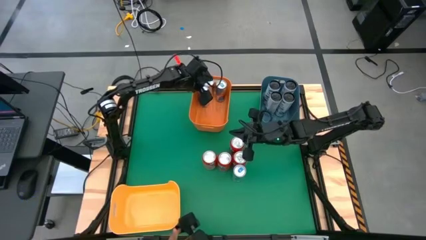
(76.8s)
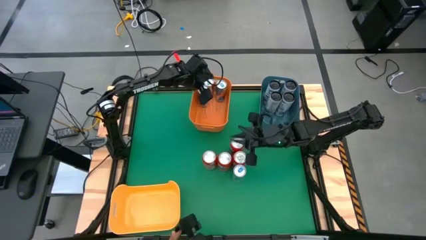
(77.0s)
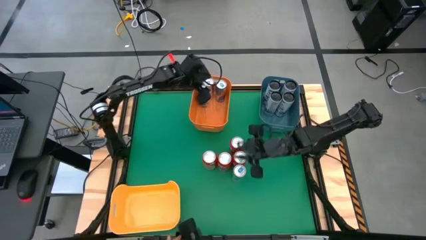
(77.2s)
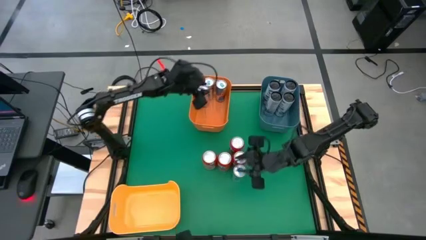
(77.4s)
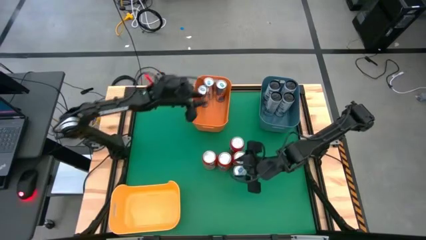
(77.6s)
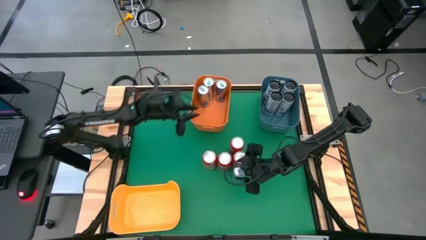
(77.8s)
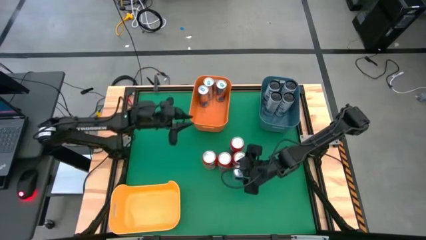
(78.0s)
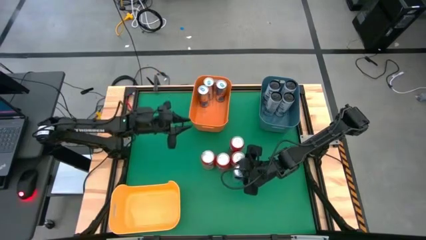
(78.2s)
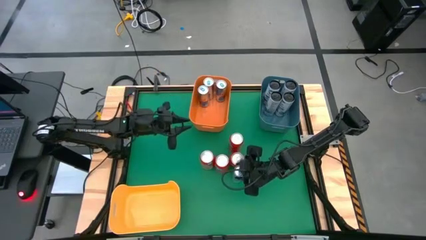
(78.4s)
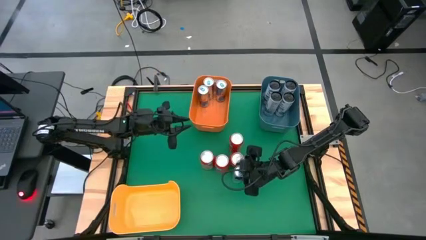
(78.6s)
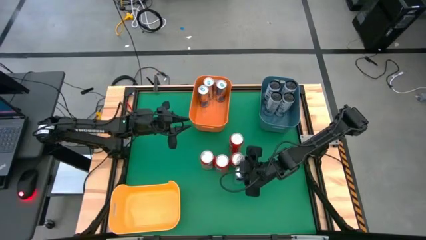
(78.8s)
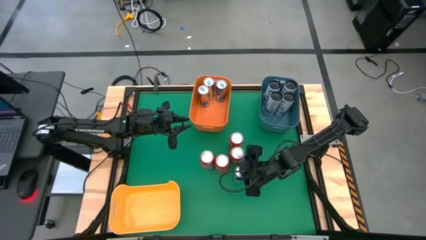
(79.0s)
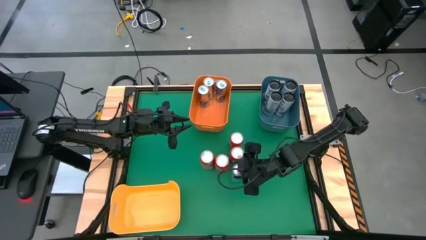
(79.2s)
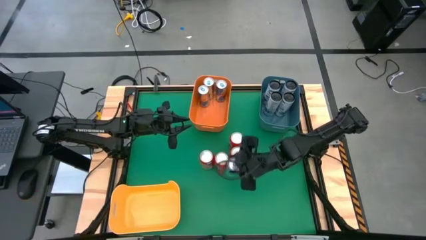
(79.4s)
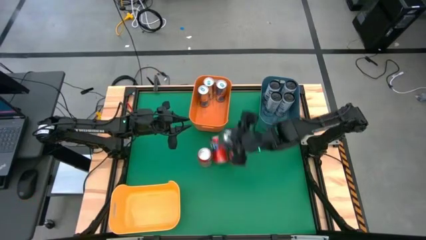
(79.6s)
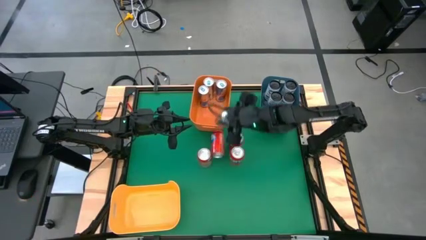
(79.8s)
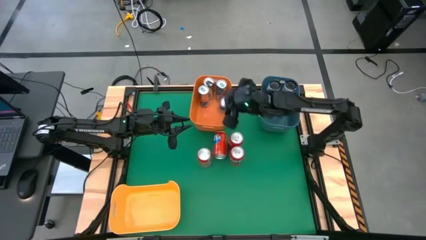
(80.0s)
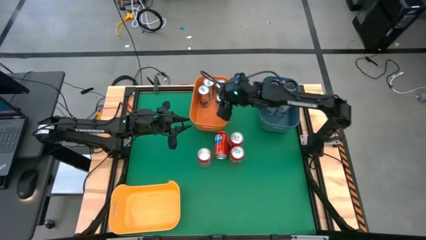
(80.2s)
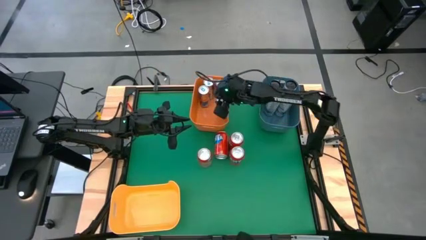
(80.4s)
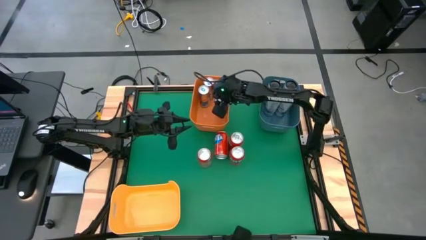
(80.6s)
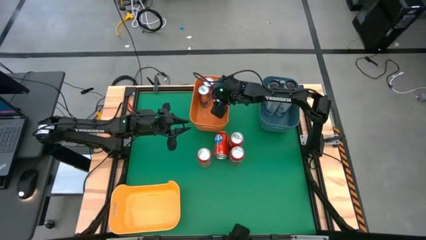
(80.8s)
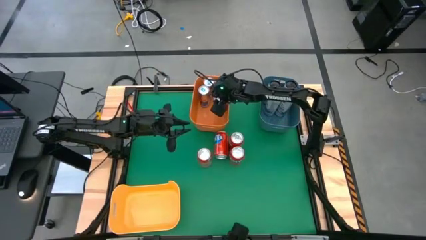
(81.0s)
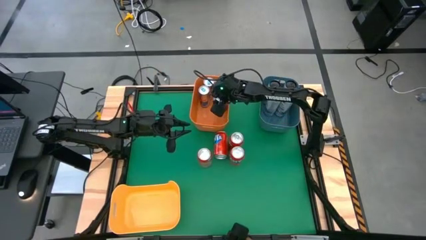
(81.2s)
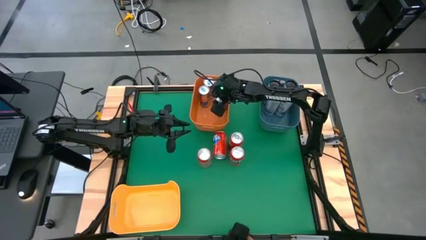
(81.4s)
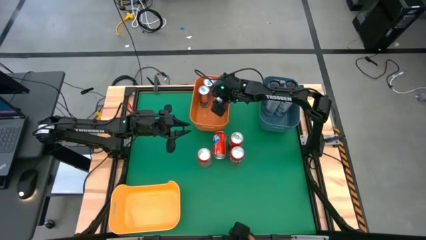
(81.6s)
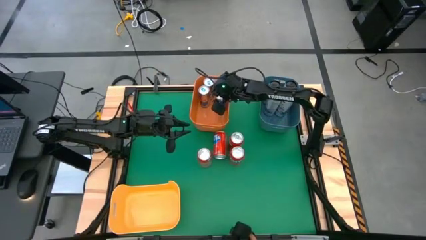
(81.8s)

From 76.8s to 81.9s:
Task: Sort soda cans
Put the blue soda can into the orange bin

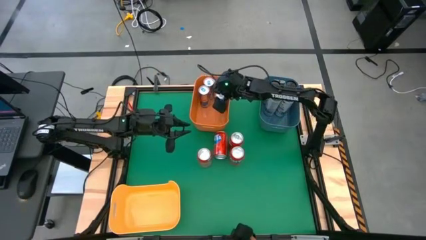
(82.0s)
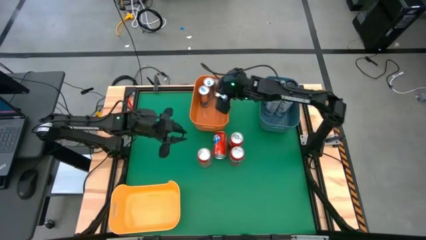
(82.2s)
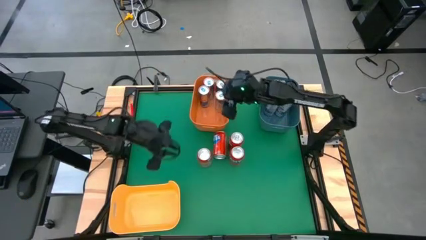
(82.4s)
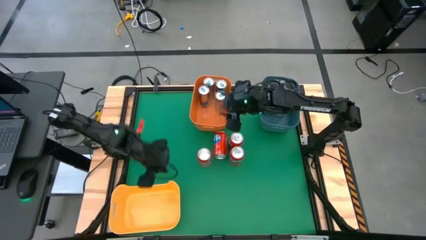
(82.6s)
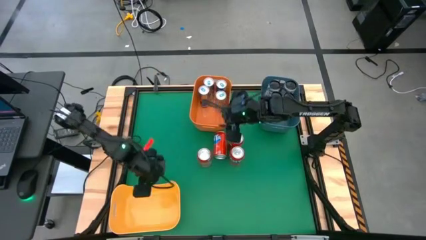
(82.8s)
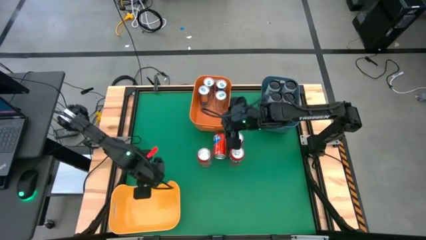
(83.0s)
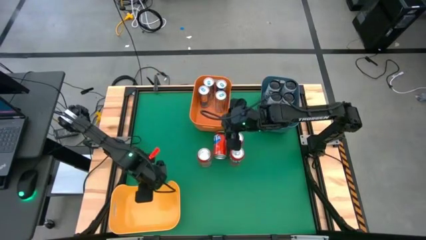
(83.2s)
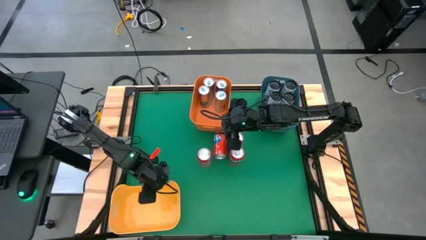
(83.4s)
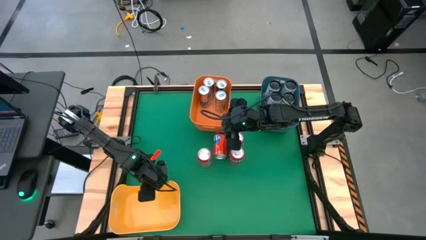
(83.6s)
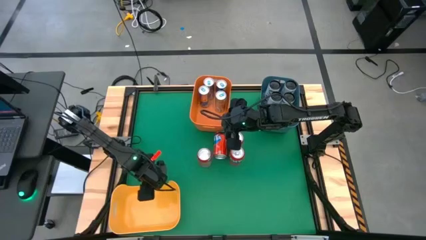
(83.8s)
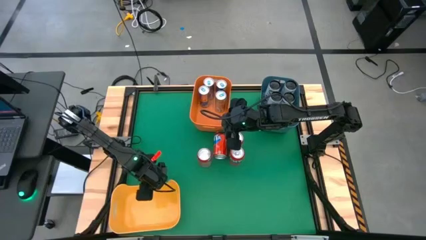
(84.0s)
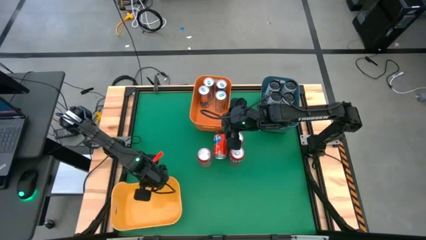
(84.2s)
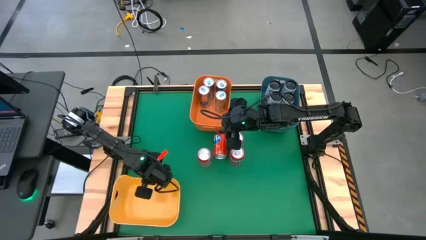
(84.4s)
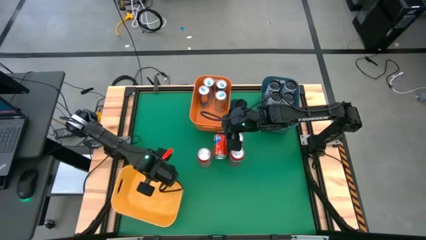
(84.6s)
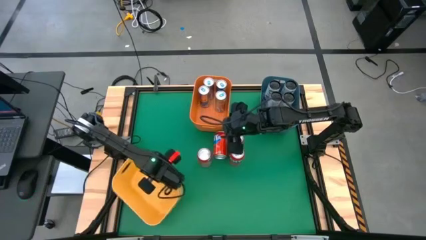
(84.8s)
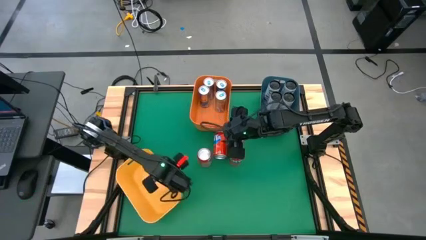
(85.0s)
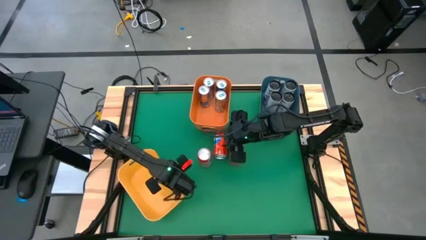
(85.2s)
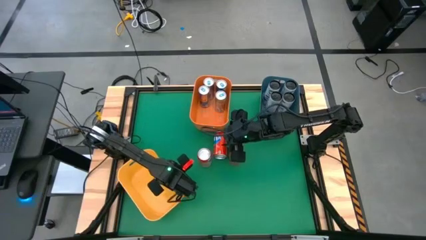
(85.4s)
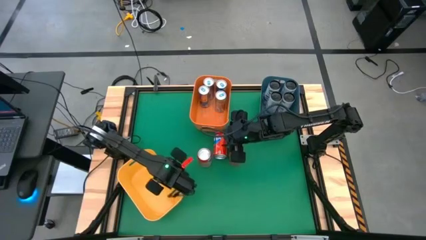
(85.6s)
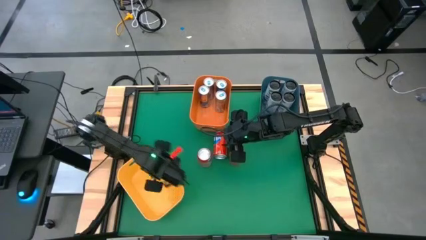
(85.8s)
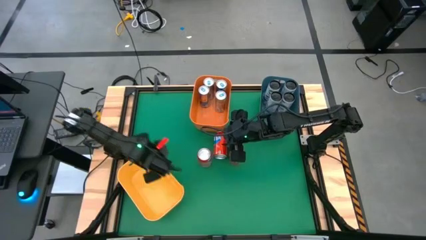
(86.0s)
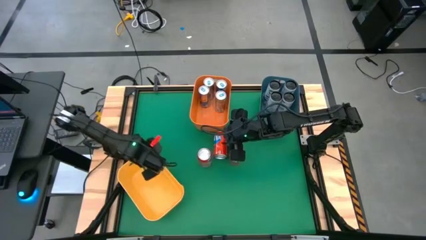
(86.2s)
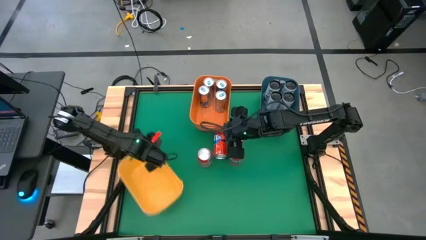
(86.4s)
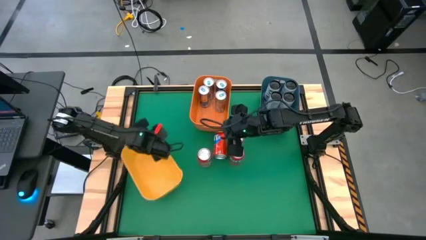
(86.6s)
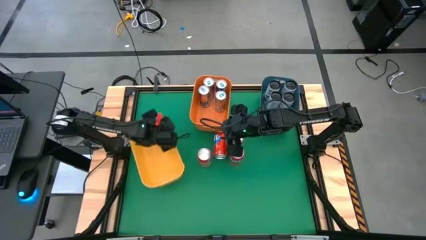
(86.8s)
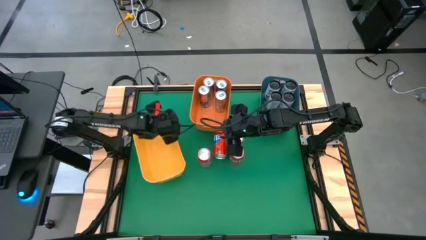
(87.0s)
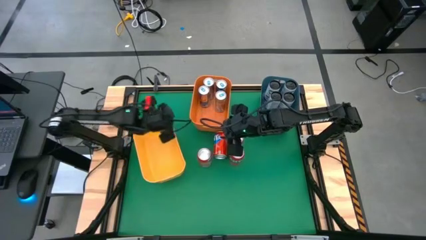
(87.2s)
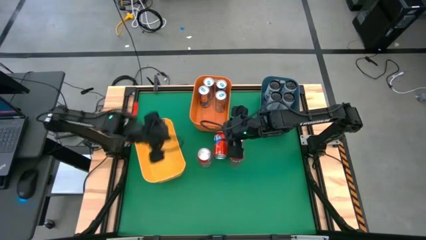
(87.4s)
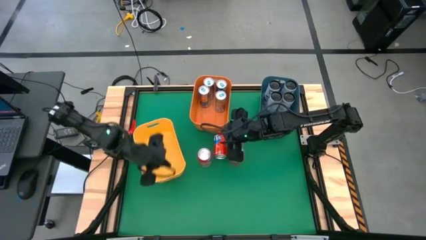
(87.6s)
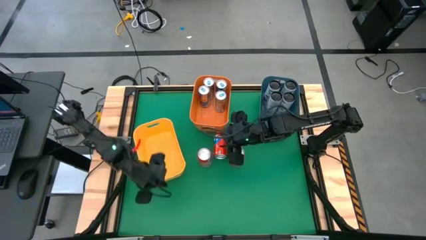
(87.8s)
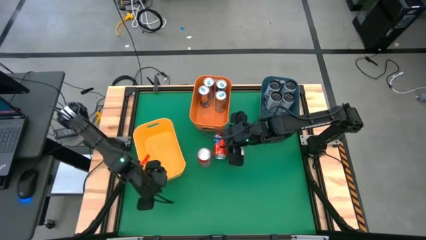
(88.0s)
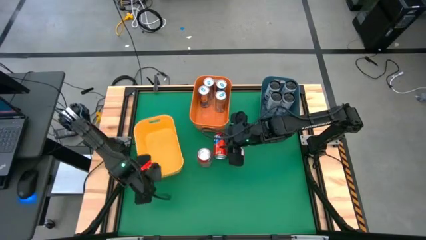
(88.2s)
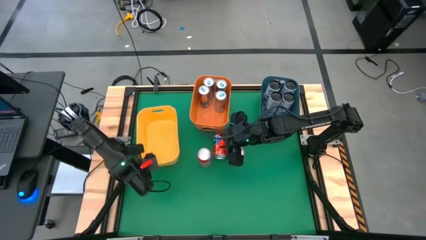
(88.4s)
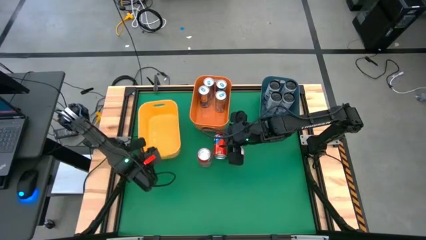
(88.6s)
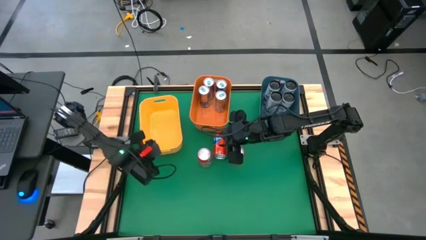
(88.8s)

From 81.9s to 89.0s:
Move the yellow bin to the top left of the table

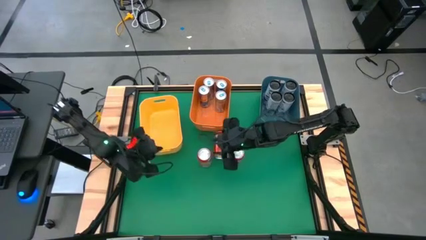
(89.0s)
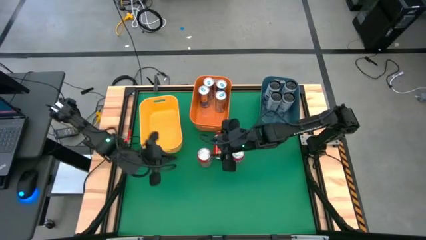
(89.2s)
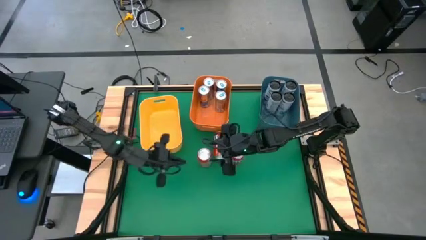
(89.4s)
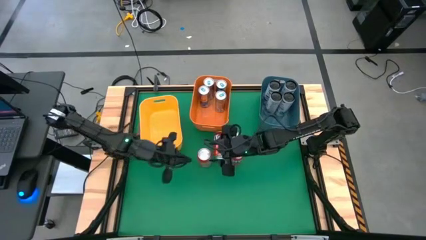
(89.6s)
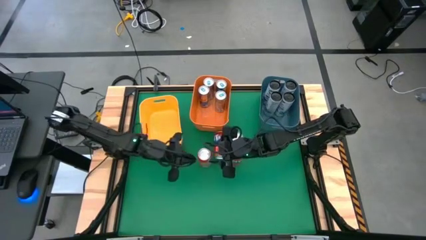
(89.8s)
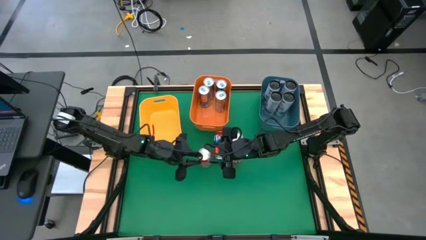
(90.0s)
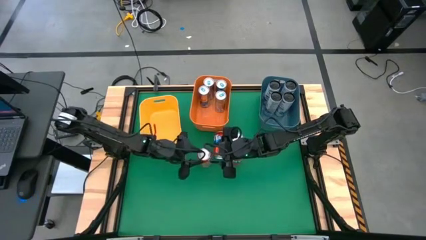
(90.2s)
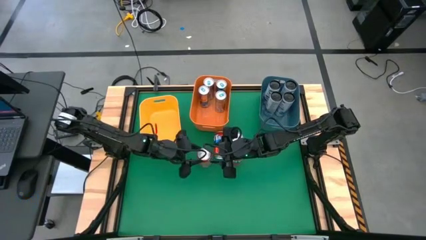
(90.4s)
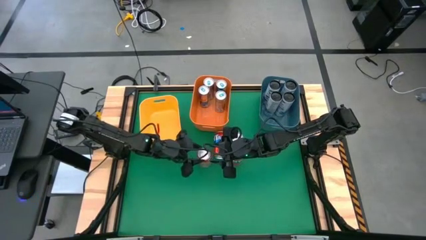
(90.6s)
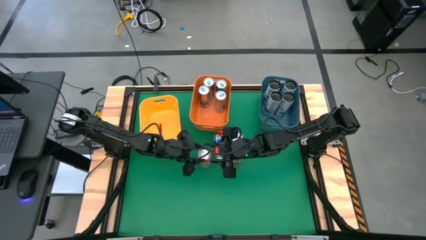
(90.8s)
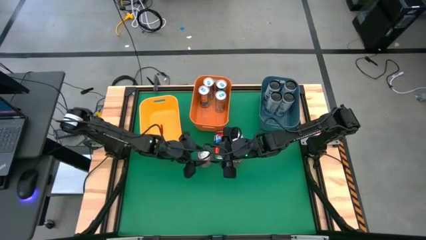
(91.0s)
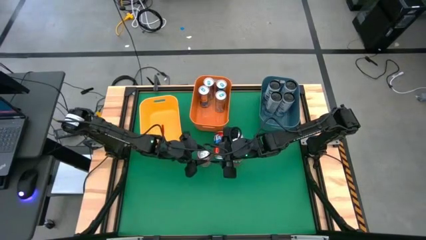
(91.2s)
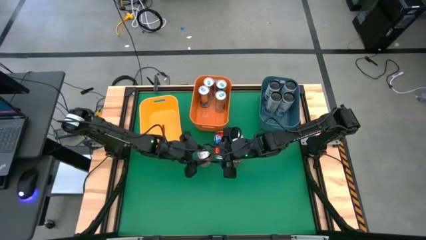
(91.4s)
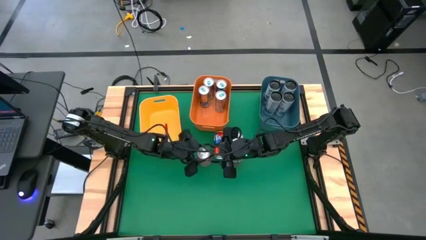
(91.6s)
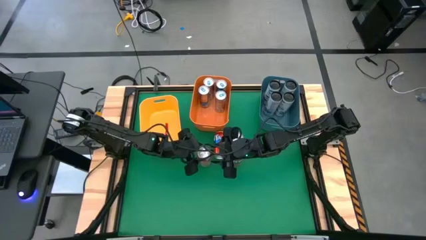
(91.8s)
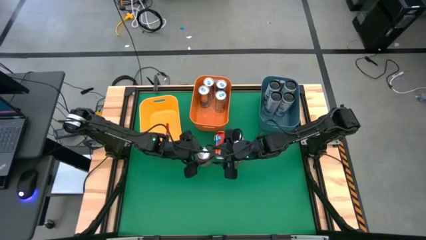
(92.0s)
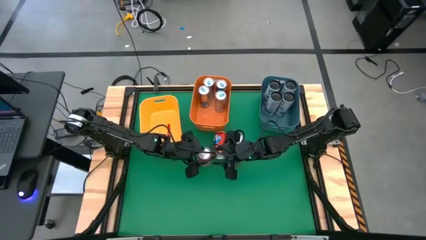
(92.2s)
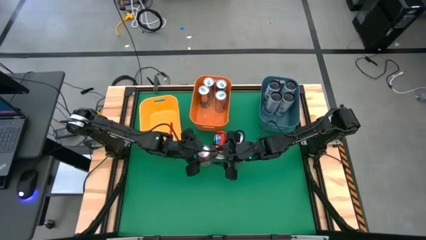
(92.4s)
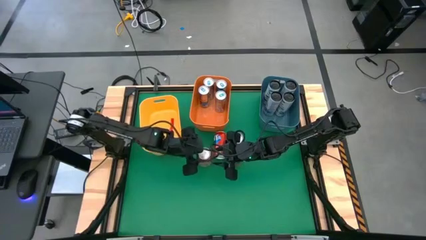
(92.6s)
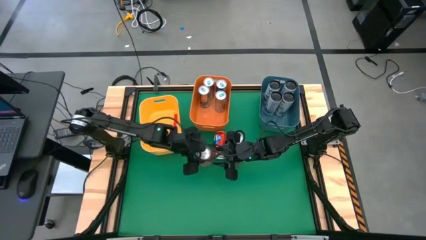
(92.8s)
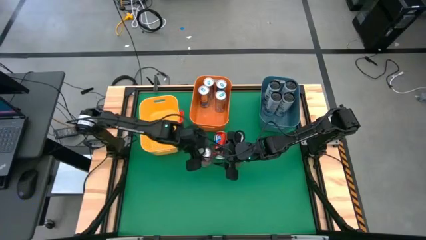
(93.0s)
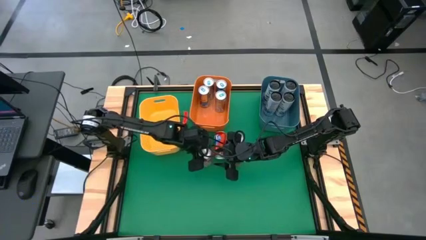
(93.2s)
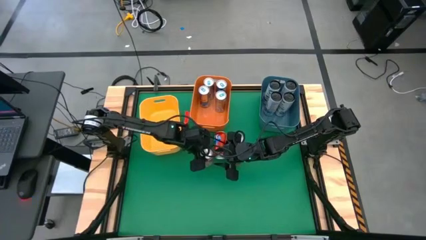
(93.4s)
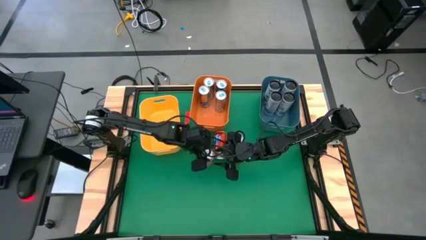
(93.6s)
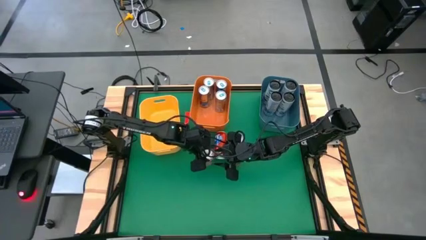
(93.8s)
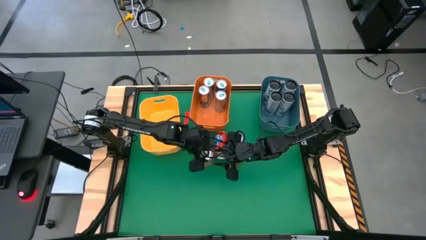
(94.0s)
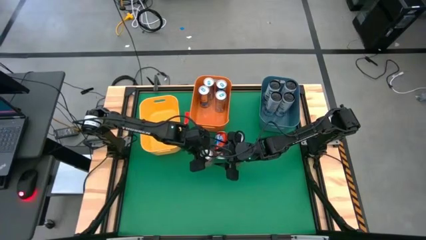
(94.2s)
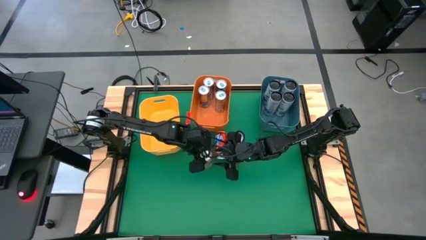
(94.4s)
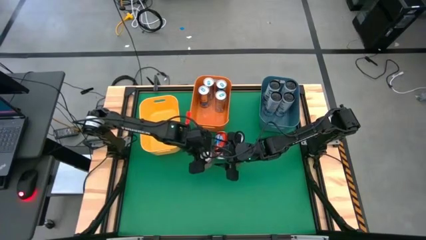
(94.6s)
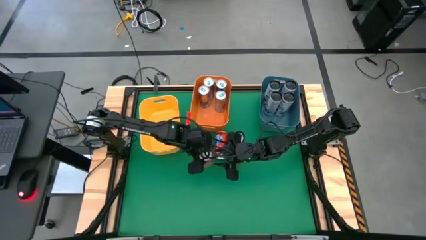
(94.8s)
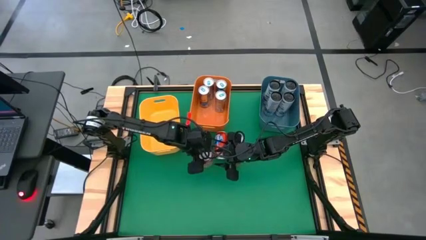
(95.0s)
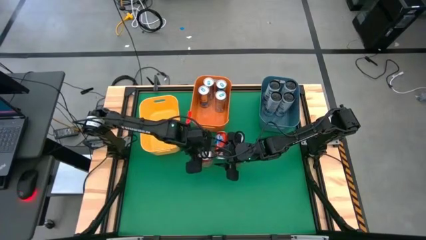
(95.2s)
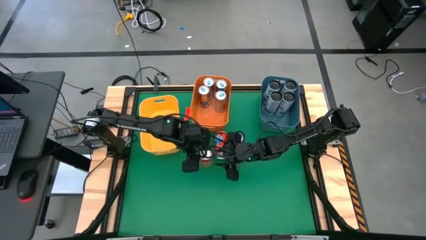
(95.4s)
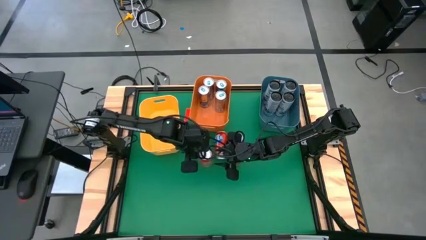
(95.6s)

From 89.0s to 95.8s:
Put the orange soda can into the yellow bin
